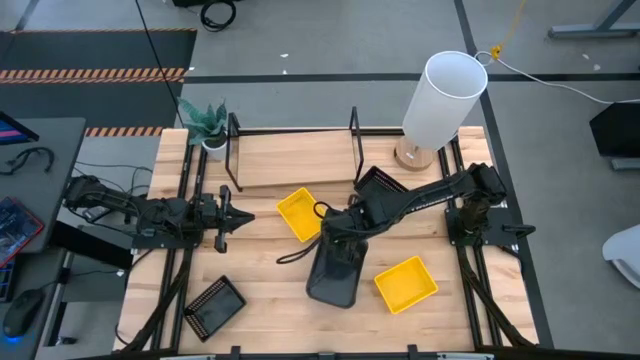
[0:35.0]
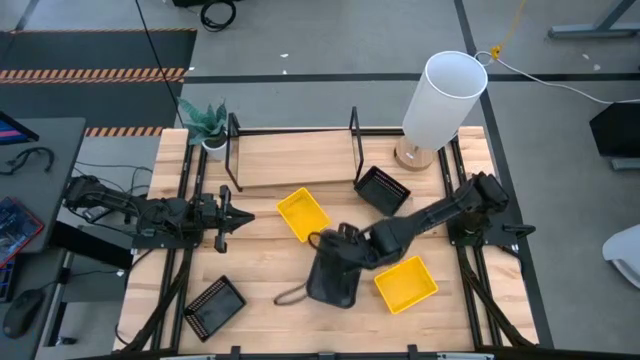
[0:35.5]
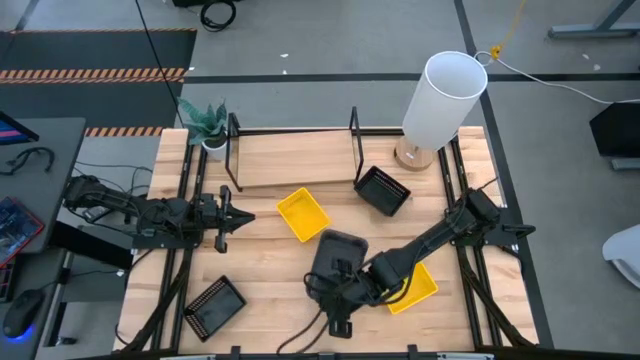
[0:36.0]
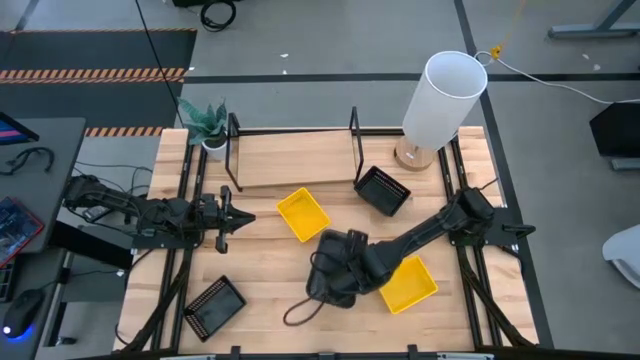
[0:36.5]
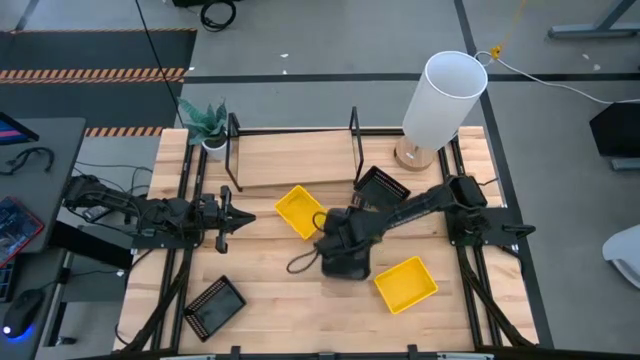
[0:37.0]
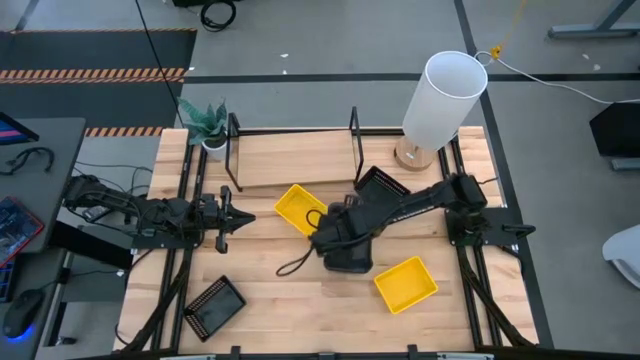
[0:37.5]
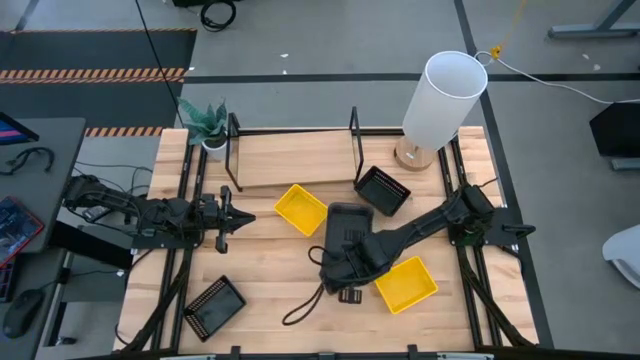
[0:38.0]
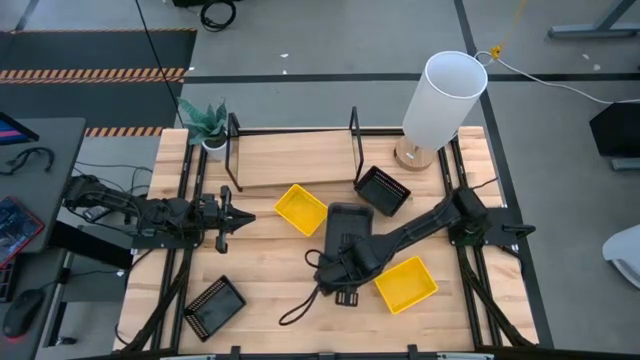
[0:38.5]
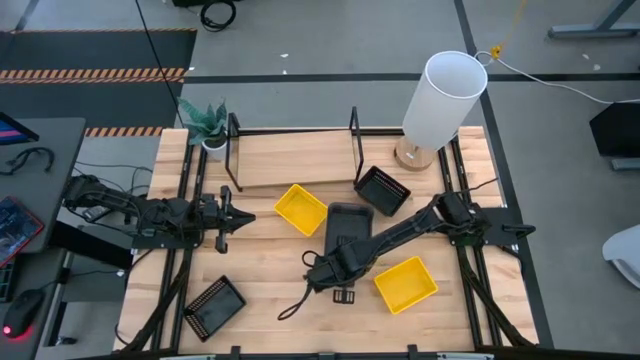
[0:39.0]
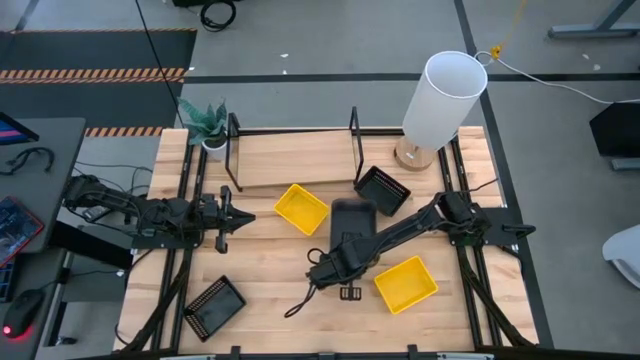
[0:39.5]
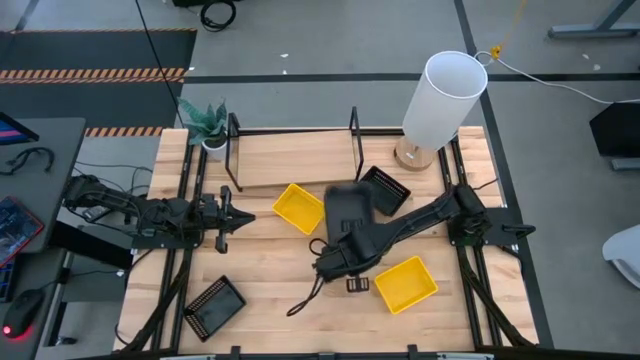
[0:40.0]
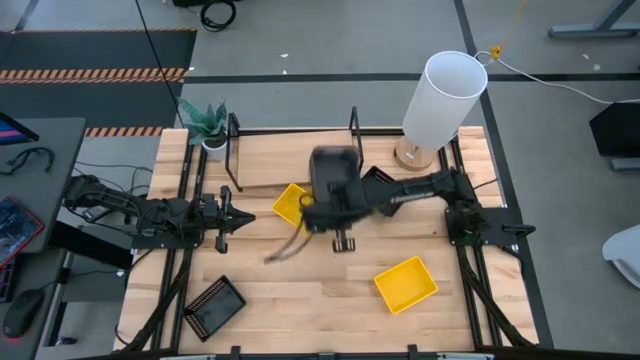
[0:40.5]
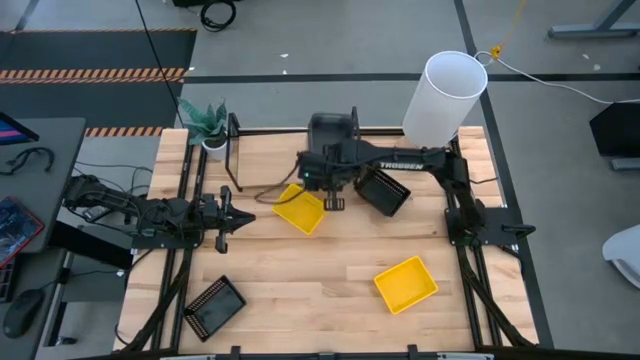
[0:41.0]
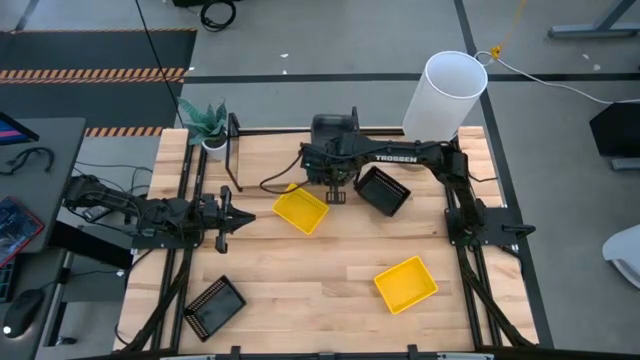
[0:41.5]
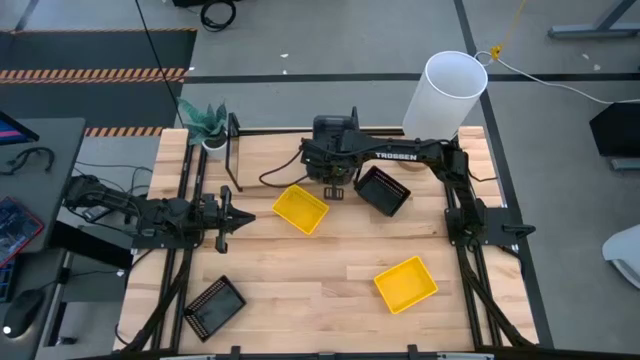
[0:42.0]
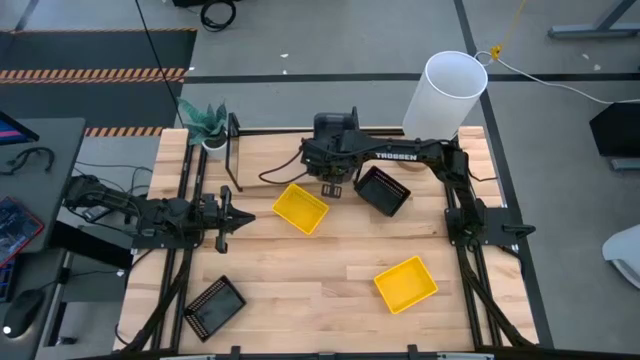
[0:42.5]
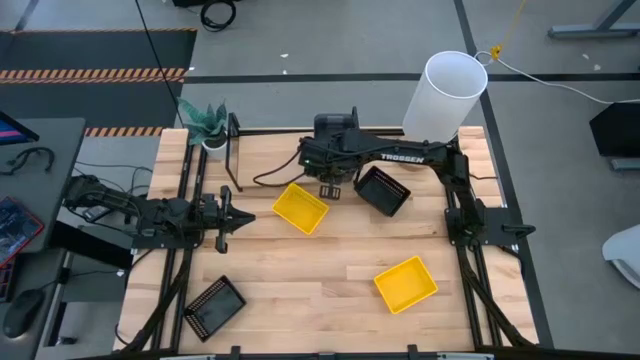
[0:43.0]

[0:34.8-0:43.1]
Task: Stack baskets on shelf by color
Put the stacked gray bins on the shelf

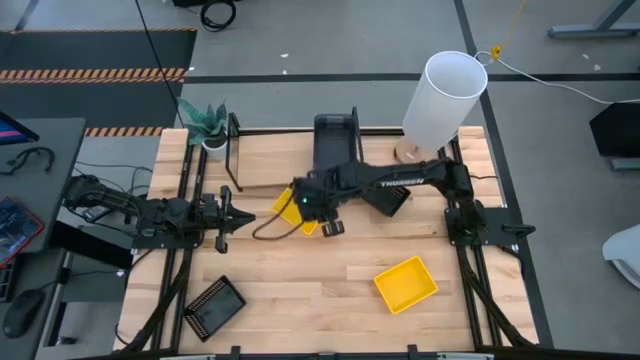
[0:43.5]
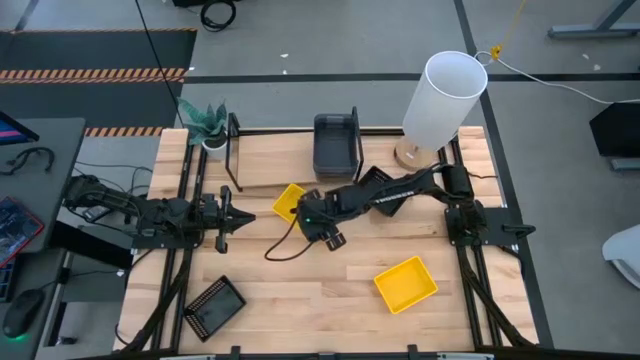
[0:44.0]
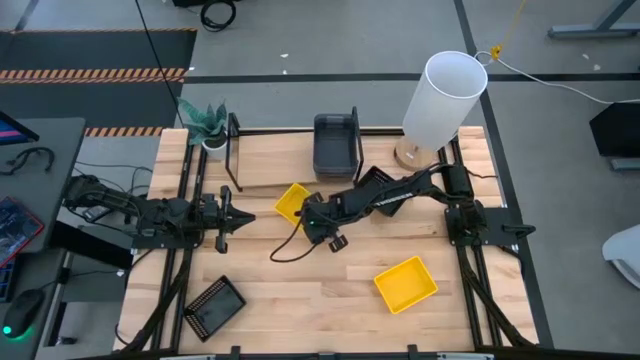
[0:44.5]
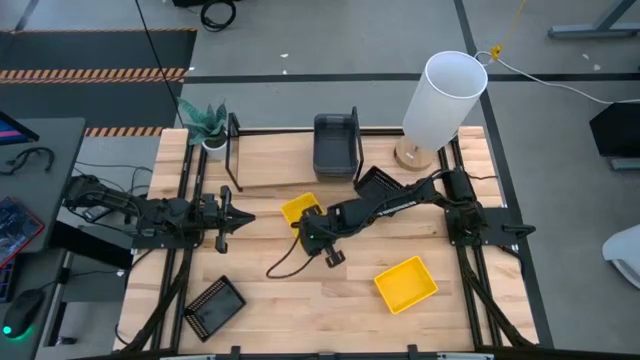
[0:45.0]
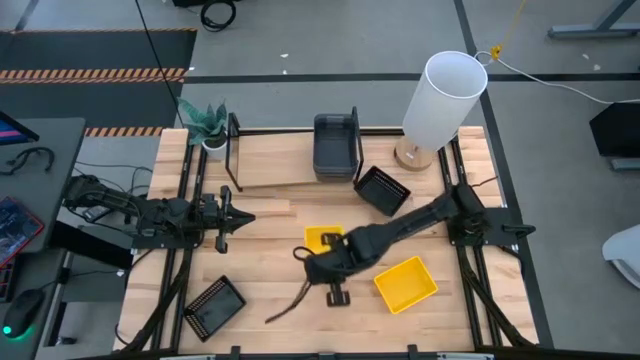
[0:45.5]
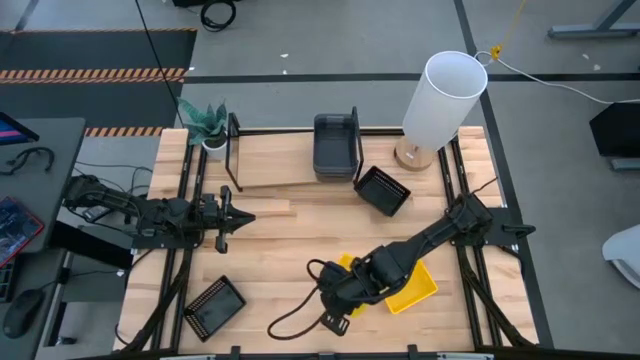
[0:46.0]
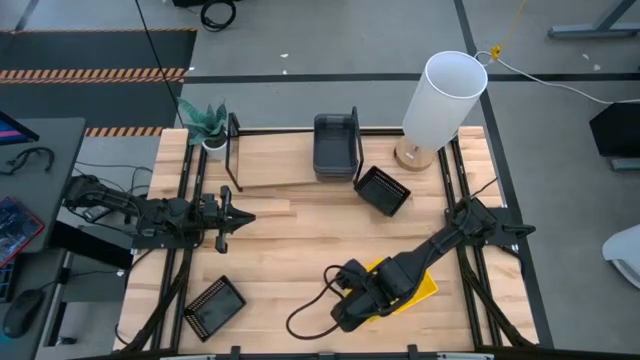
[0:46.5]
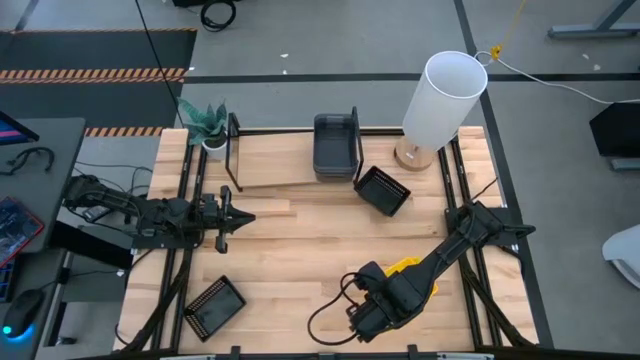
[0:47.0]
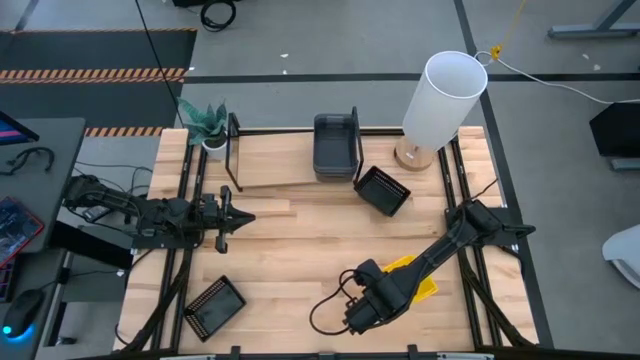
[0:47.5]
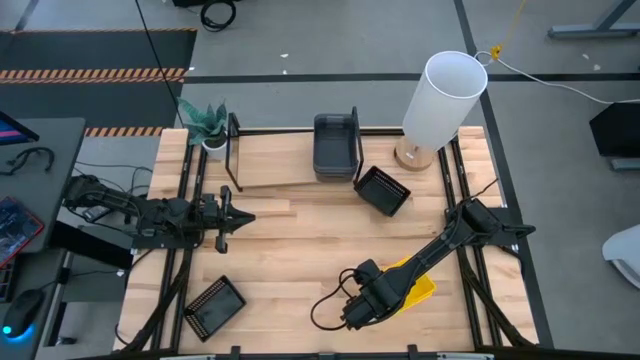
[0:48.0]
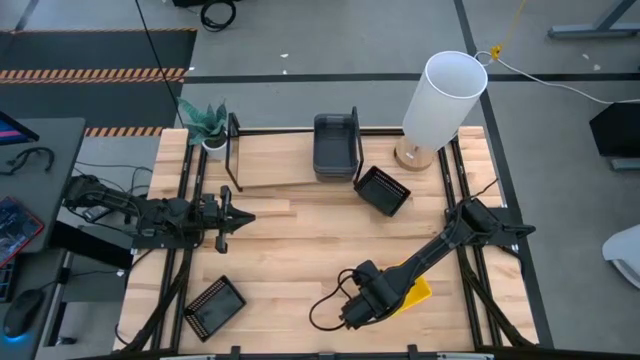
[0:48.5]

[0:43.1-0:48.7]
Stack the top yellow bin on top of the yellow bins

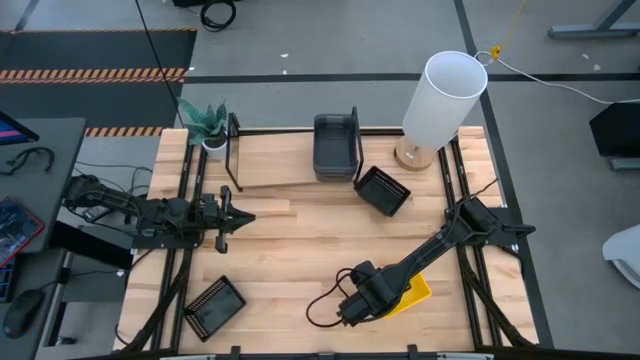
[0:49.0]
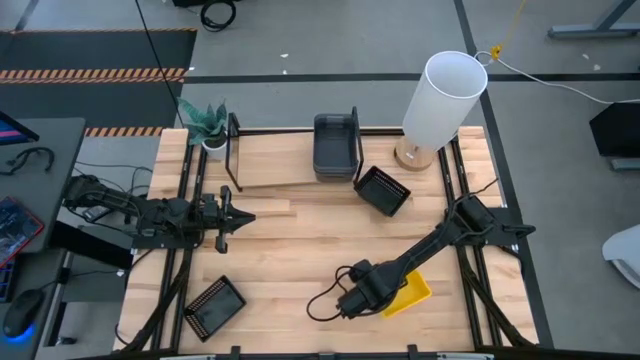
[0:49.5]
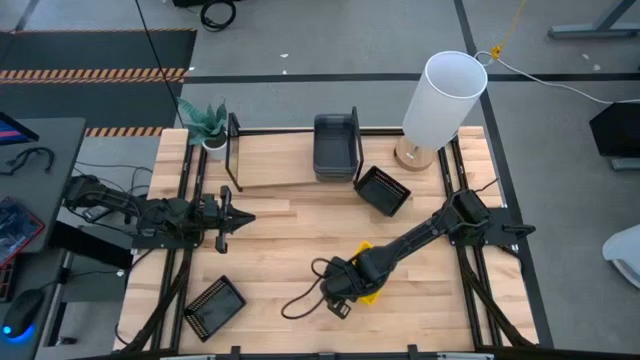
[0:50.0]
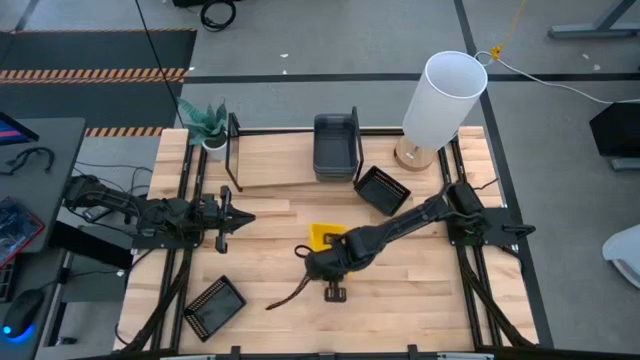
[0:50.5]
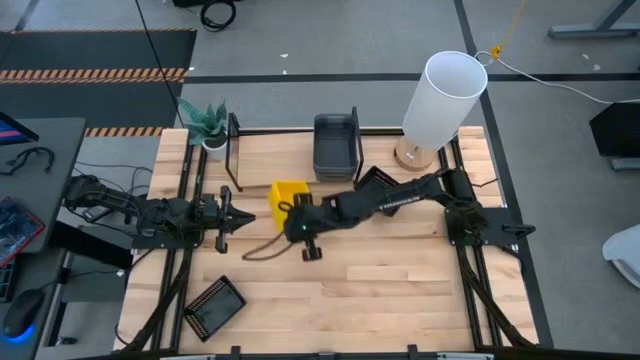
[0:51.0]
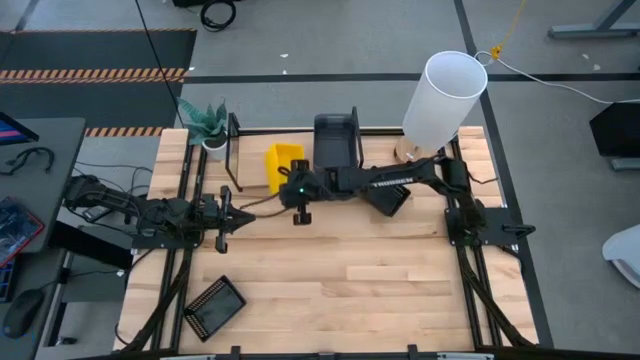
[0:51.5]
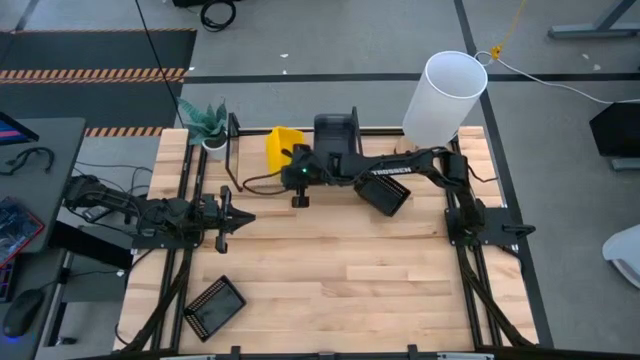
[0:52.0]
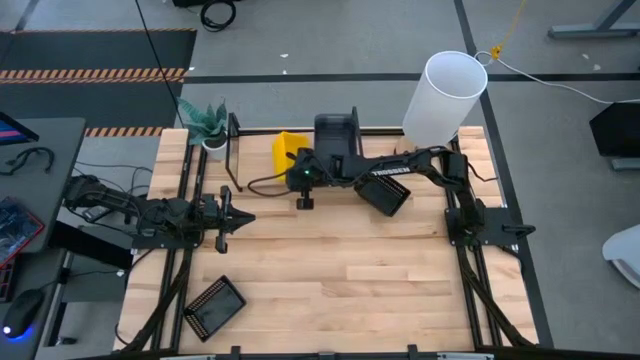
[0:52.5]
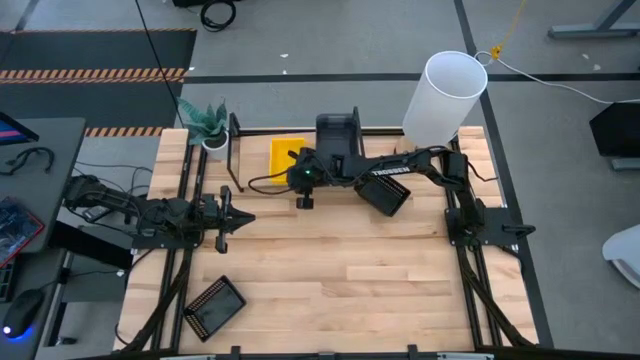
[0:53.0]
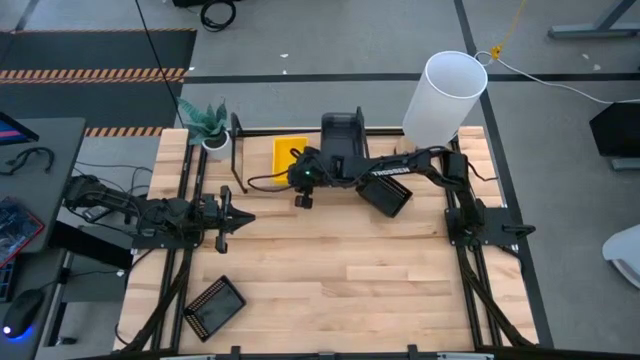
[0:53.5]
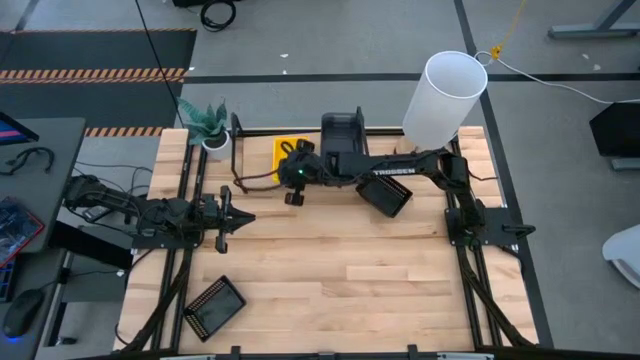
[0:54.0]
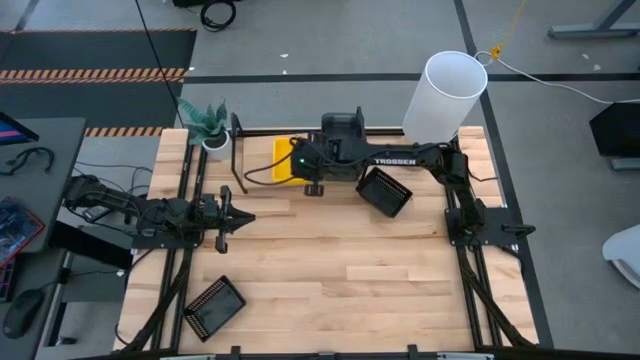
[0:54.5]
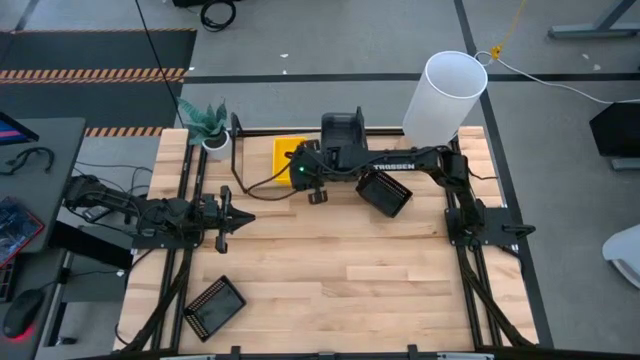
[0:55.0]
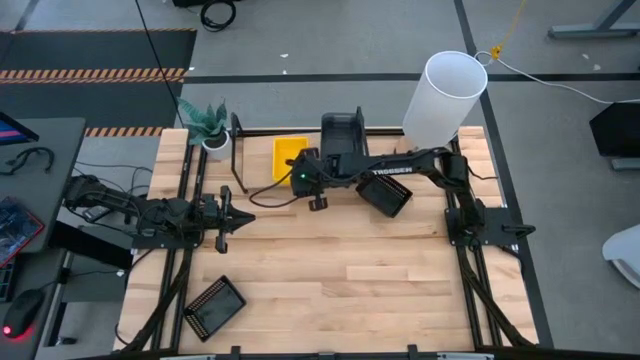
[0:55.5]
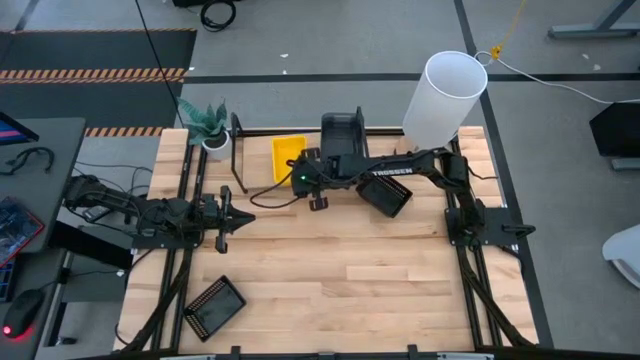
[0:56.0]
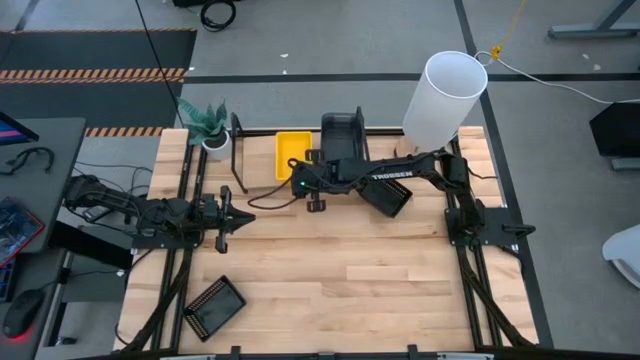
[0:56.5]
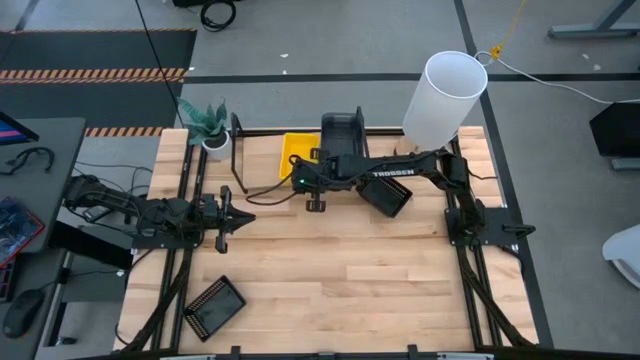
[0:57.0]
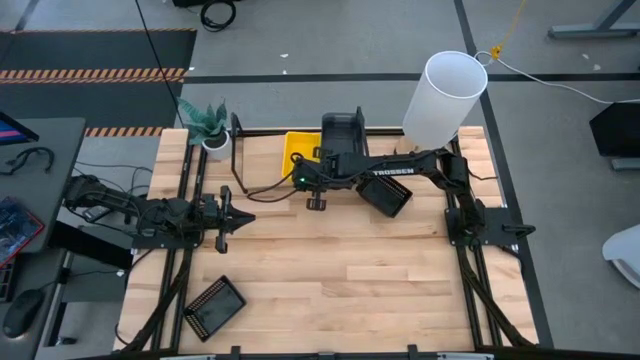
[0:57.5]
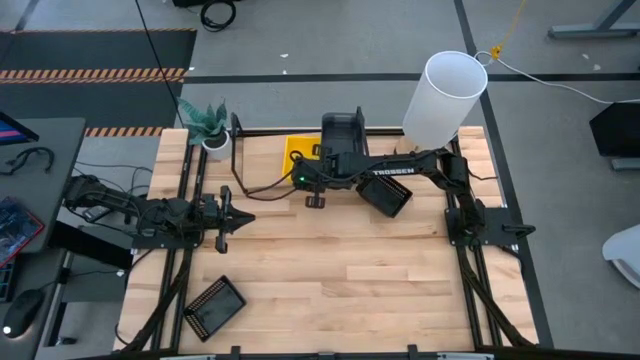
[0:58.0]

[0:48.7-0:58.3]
Put the stacked yellow bins on the shelf
